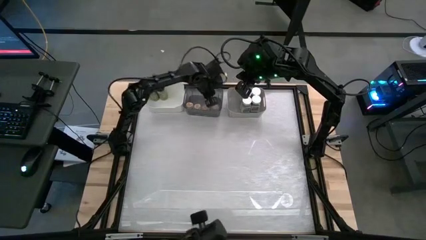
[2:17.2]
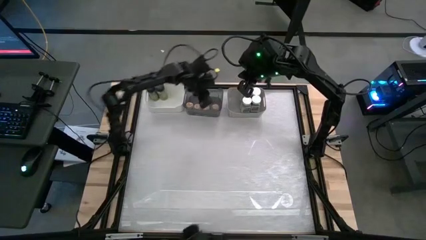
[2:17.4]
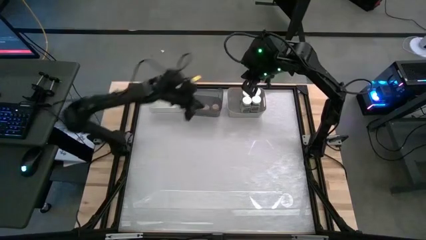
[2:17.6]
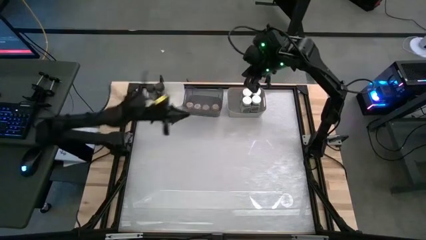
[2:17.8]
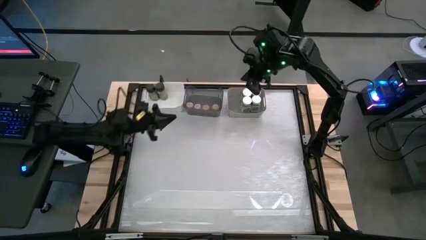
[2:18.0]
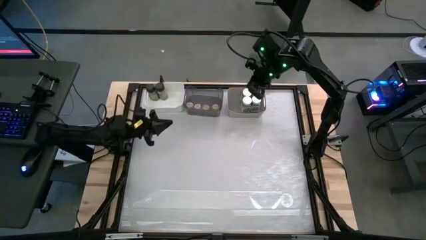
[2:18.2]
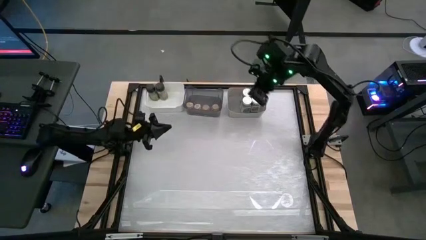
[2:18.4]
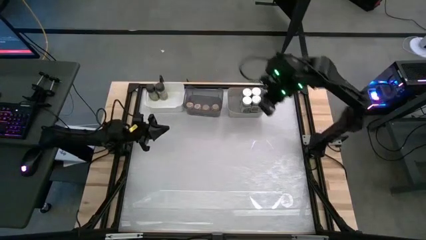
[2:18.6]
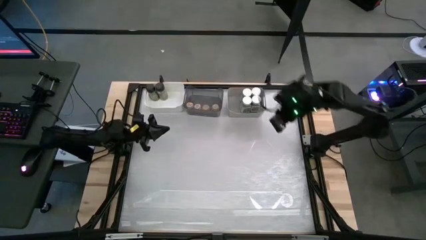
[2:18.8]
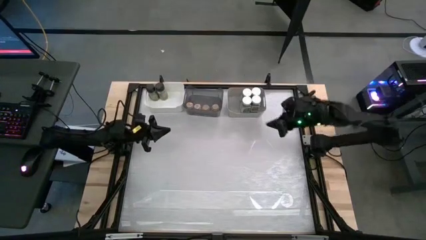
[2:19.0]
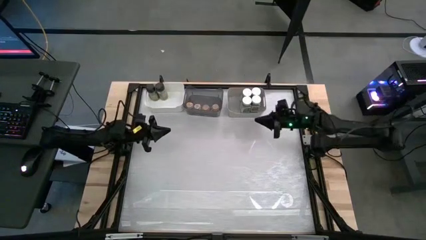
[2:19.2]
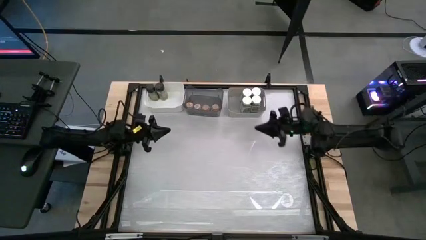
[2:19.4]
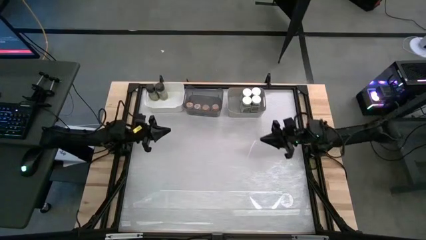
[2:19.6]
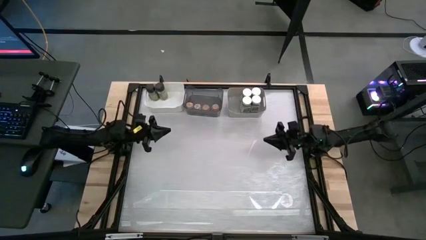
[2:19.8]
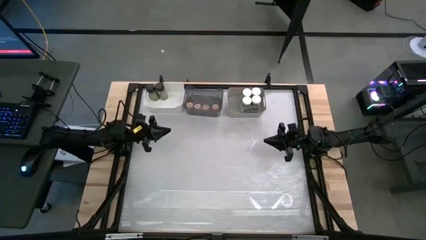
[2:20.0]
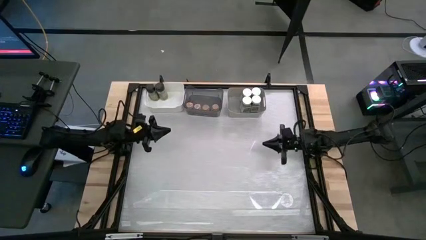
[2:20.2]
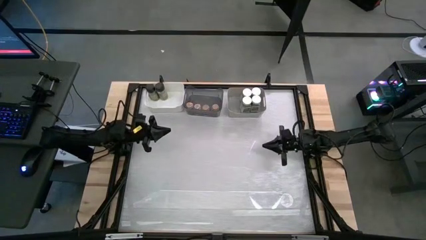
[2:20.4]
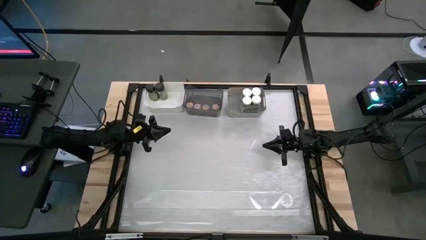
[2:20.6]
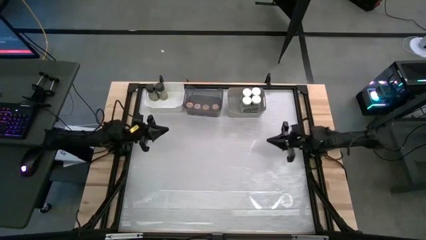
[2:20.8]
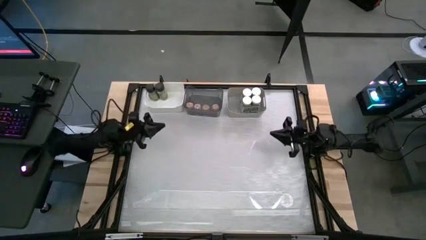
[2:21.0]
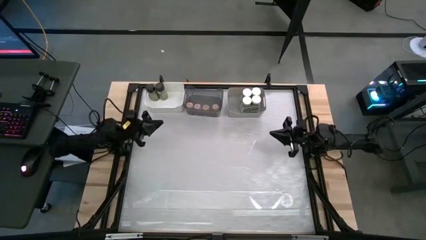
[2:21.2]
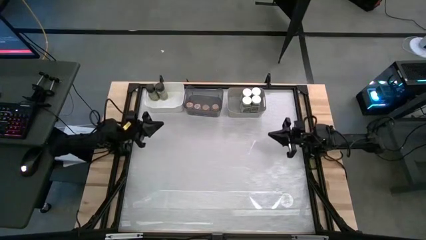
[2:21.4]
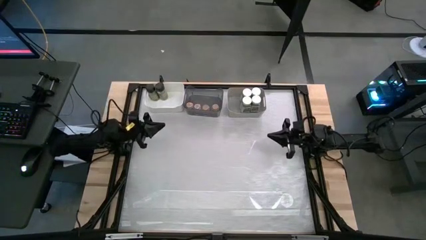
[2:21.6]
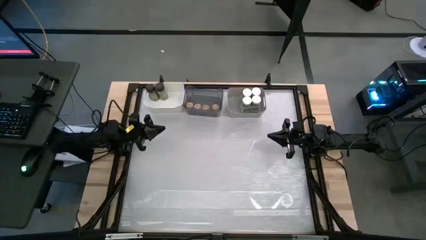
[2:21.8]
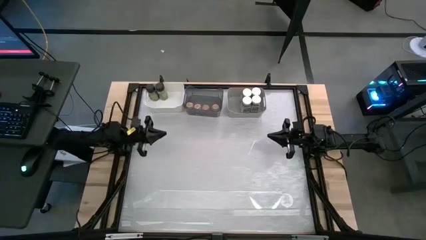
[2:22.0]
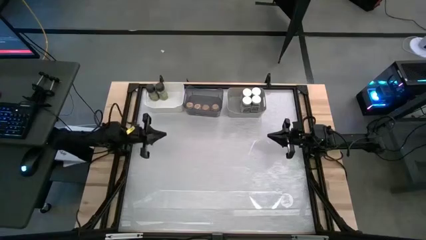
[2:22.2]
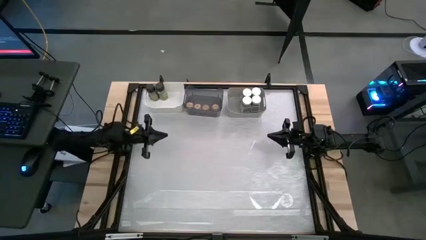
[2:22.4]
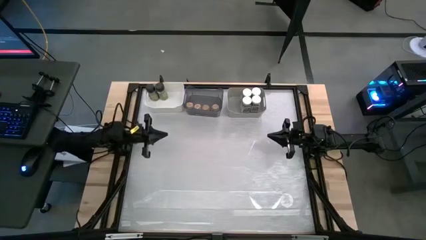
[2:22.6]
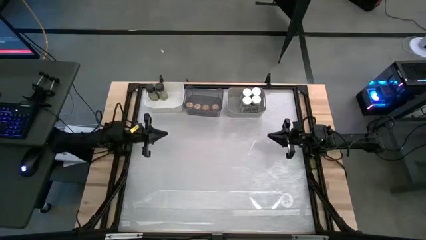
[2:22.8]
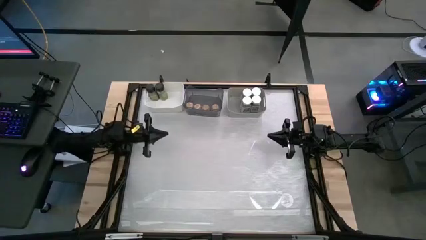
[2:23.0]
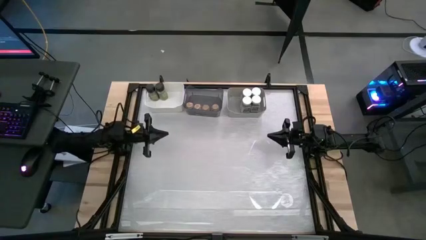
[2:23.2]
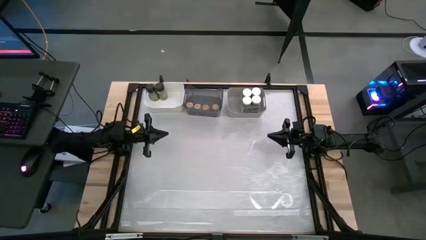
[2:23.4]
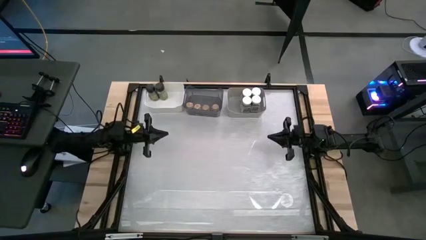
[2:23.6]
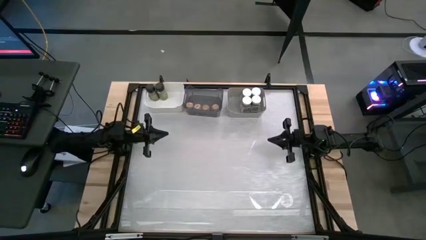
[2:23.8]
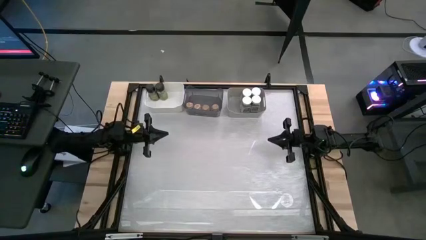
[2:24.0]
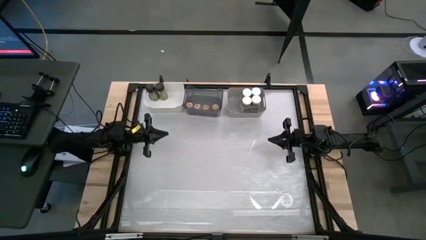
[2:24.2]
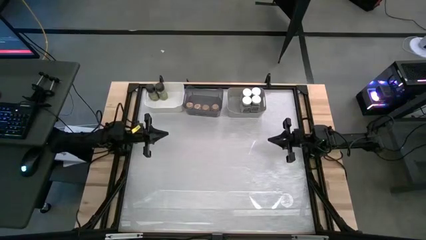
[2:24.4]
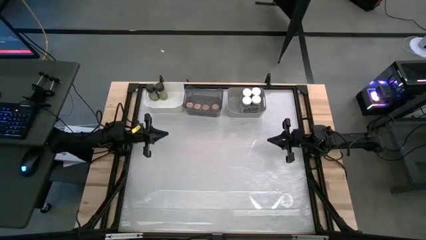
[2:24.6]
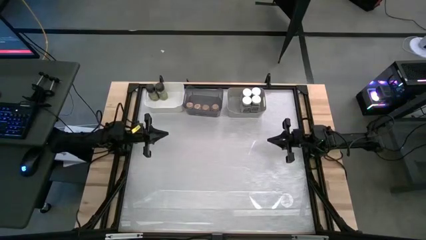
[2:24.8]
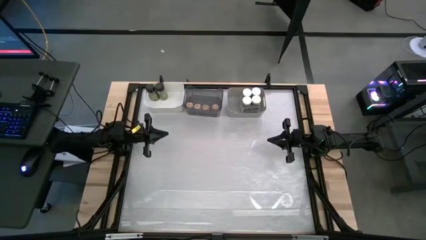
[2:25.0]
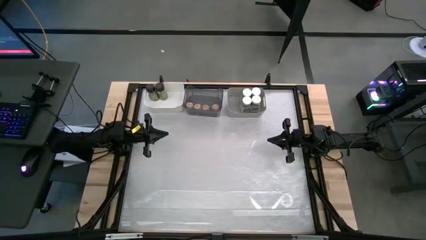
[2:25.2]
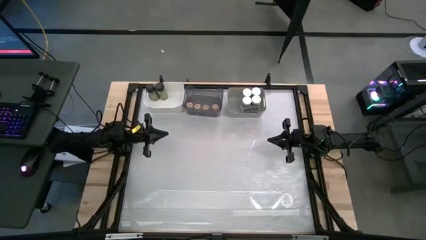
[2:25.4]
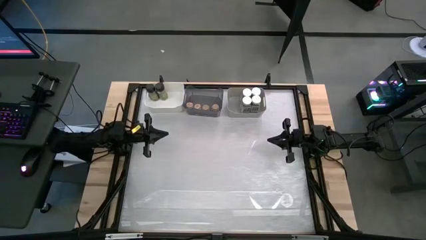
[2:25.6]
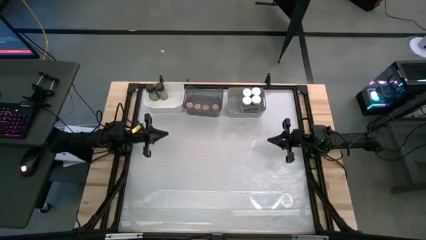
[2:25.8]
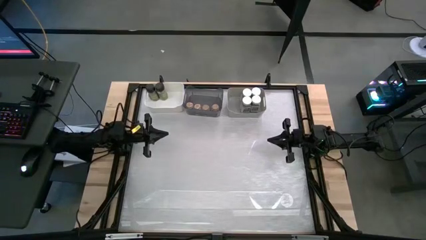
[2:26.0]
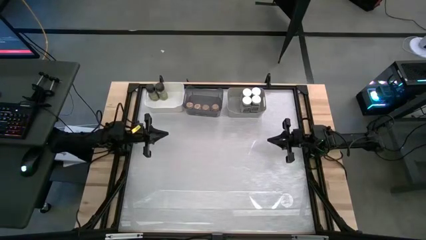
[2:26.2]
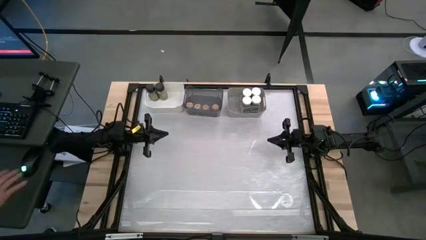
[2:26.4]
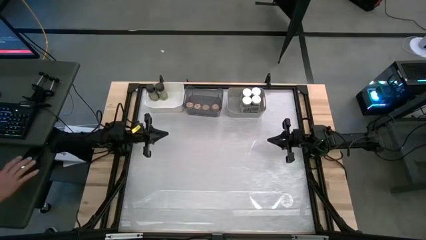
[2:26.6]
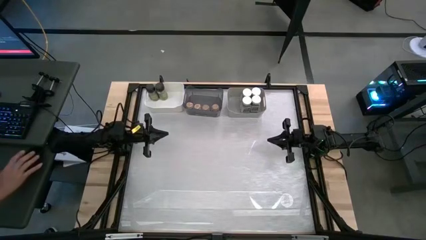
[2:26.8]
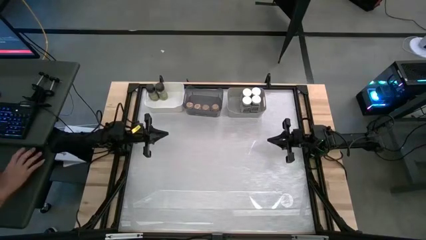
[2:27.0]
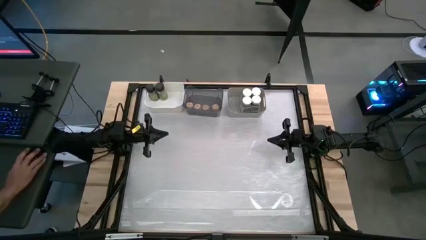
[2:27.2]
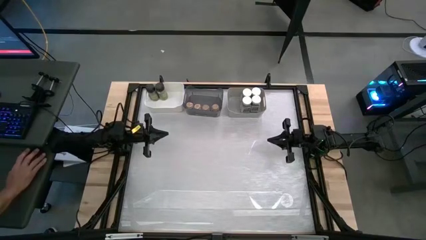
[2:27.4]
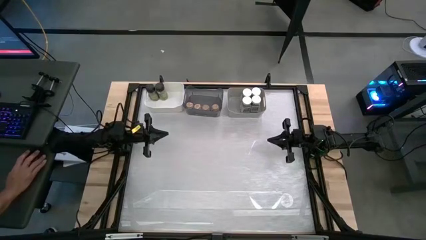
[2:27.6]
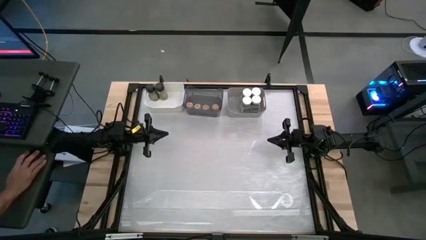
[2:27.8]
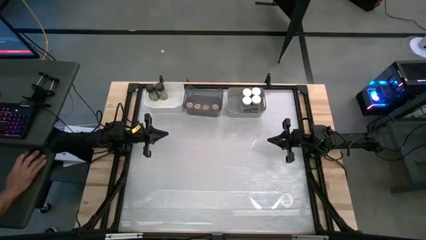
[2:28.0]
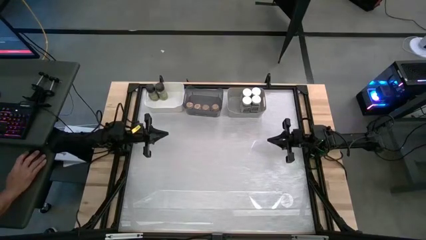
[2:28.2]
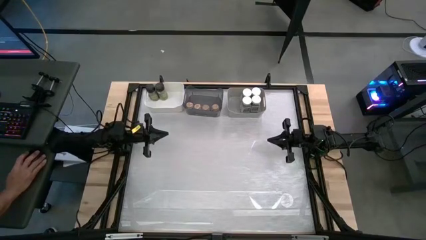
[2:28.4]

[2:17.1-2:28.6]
Task: Sort spices by type
Return to Home Position
